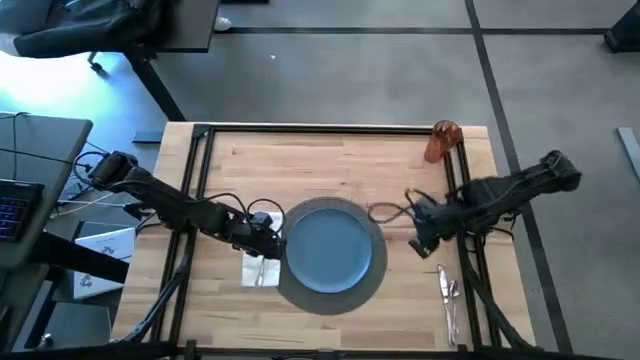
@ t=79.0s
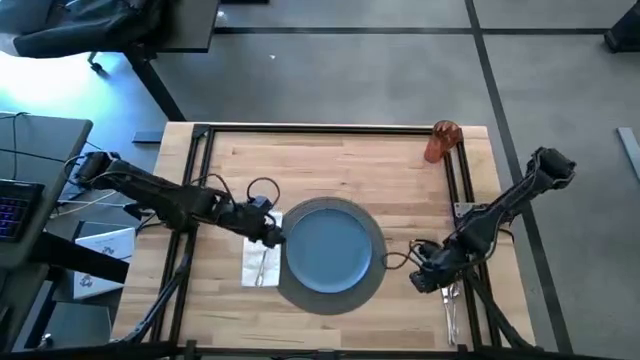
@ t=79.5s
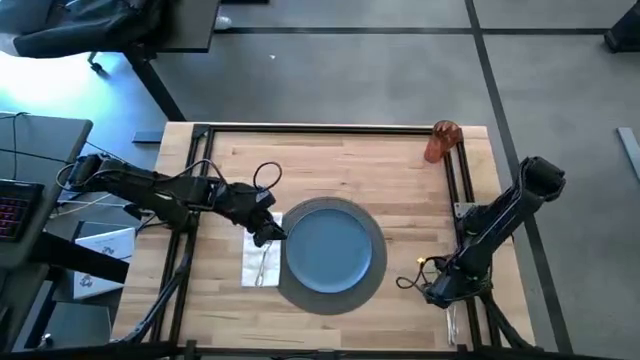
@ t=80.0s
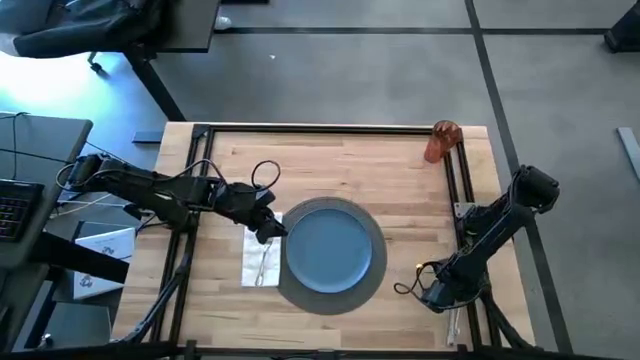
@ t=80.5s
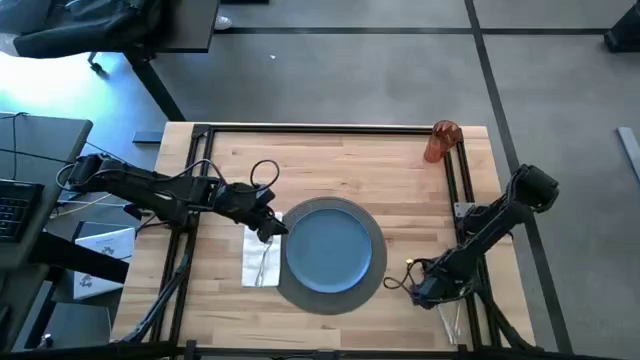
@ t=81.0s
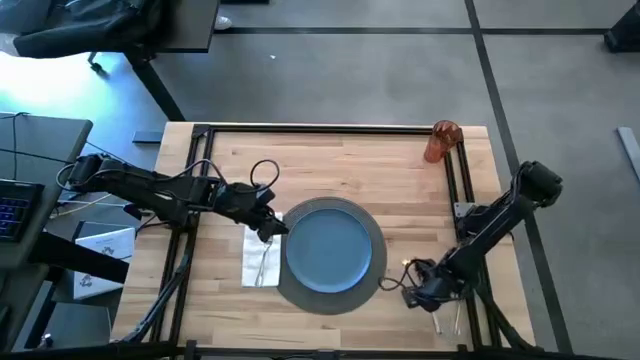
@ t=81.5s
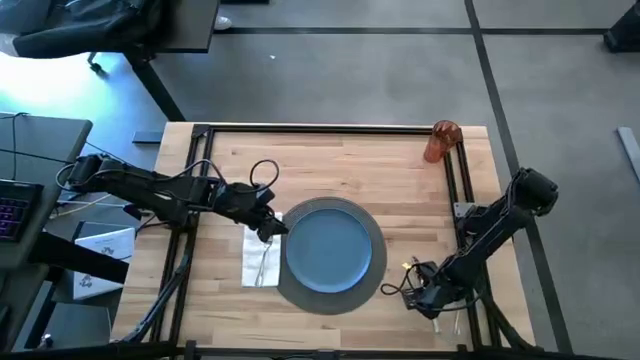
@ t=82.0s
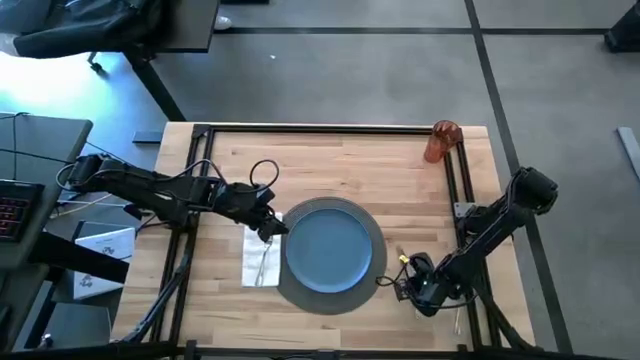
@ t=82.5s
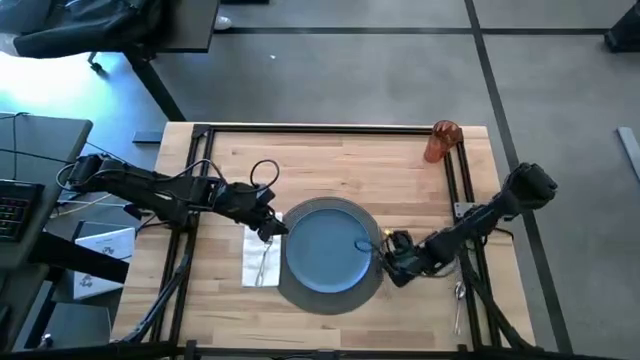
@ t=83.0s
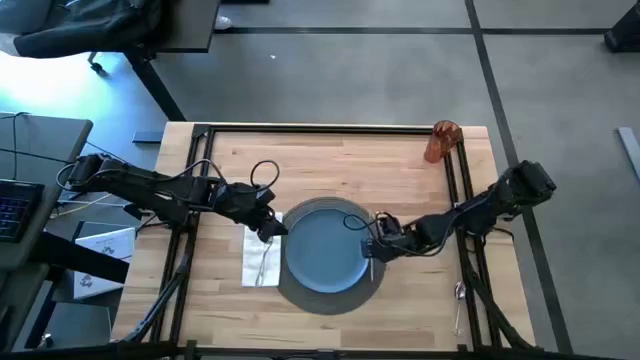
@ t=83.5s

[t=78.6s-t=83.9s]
Task: Set table place
Put the silver table knife on the table mat to the right side of the blue plate

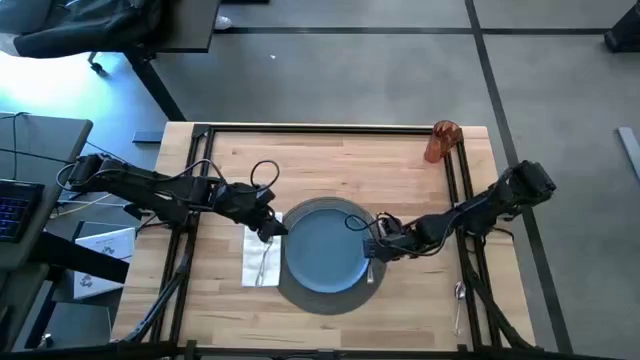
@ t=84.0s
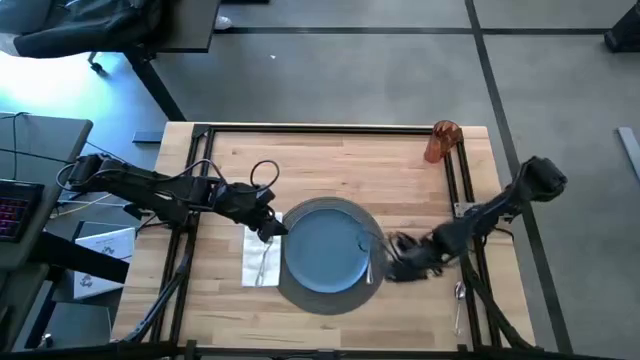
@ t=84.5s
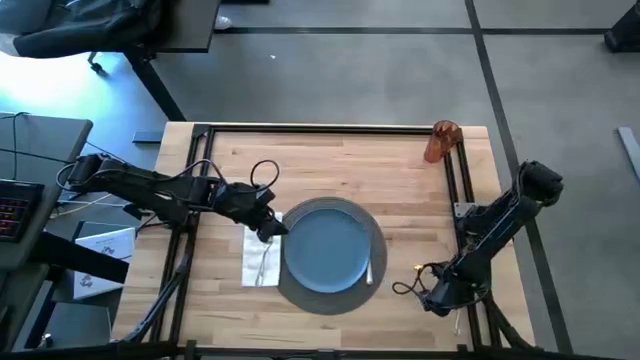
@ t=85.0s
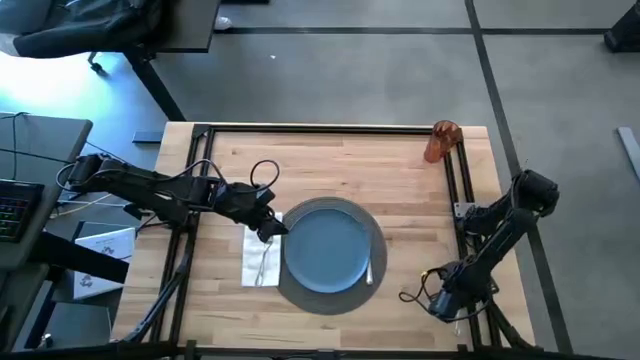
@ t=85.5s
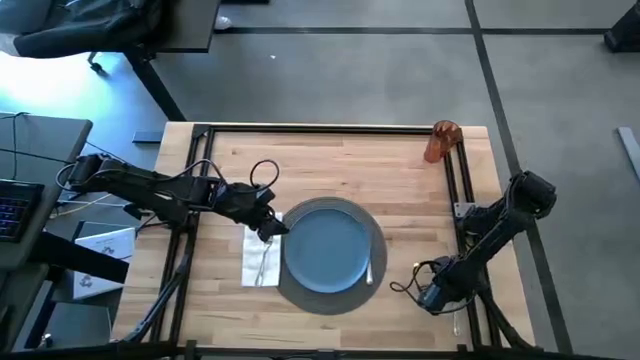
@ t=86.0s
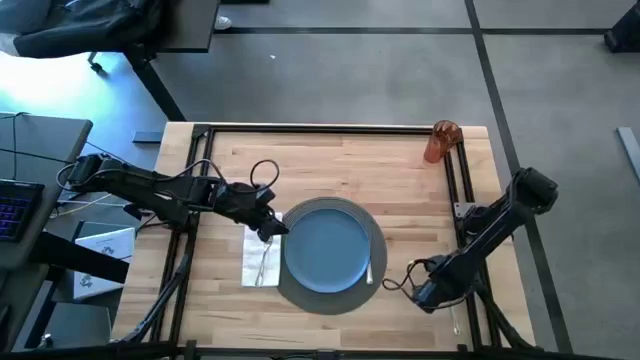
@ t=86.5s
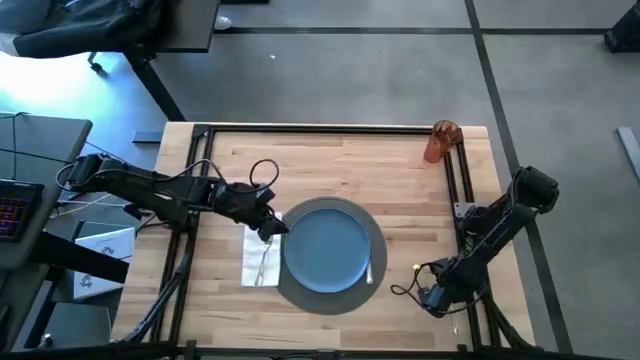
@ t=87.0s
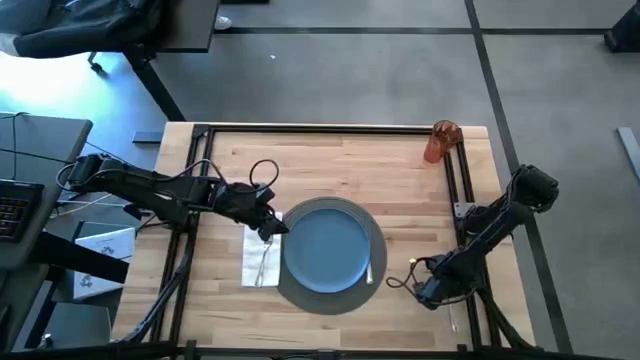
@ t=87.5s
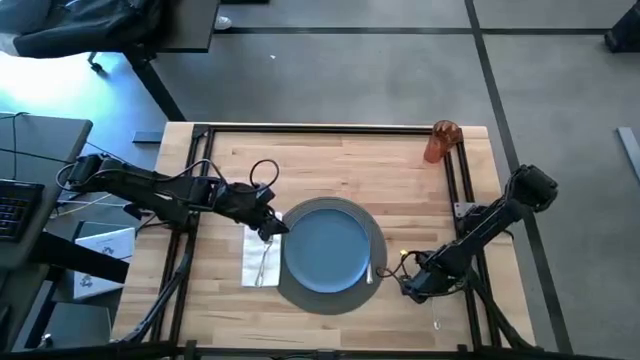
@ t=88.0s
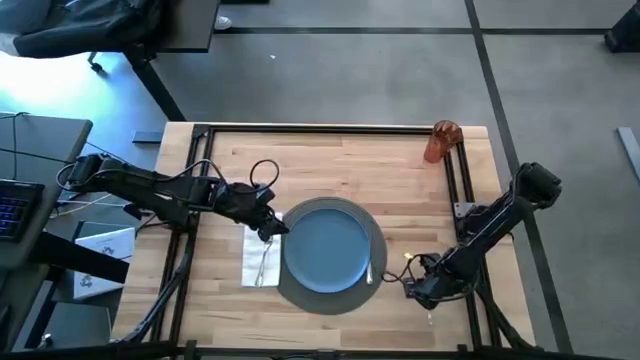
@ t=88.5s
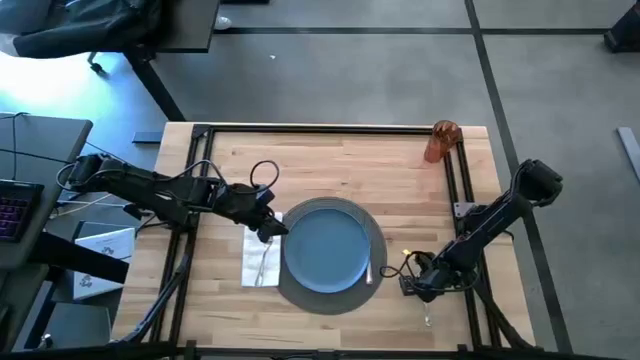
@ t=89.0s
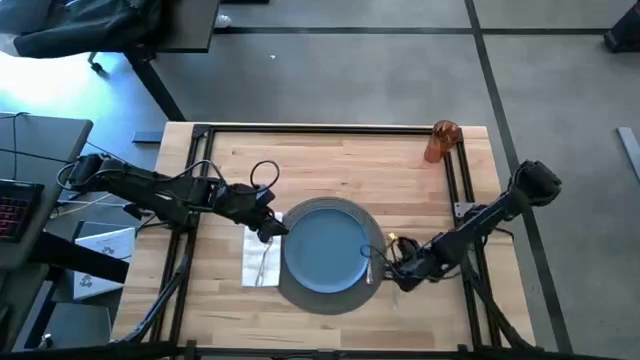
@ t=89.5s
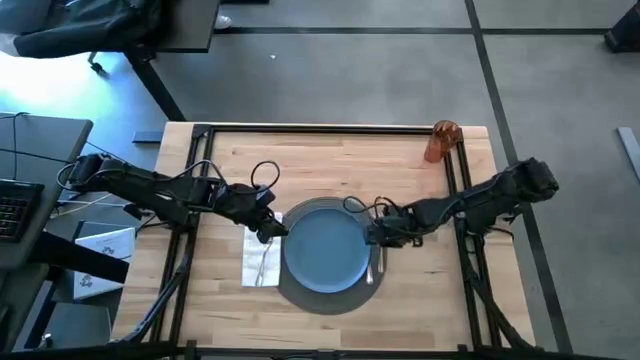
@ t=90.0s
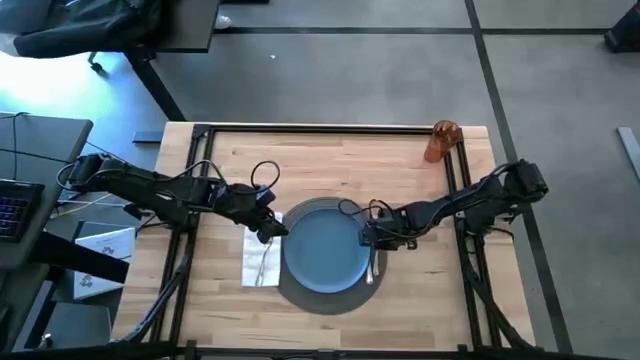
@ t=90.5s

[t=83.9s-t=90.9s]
Put the silver spoon on the table mat to the right side of the silver table knife

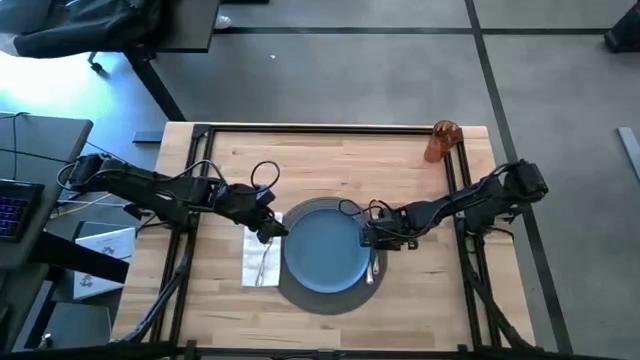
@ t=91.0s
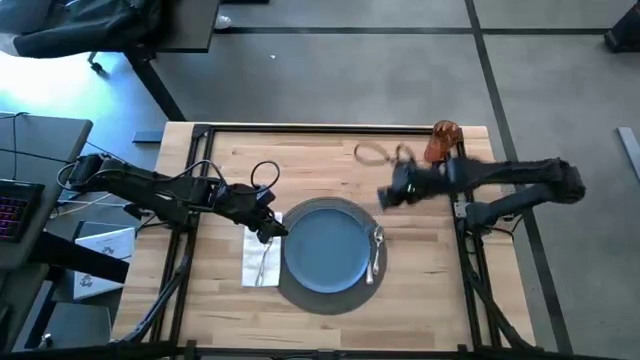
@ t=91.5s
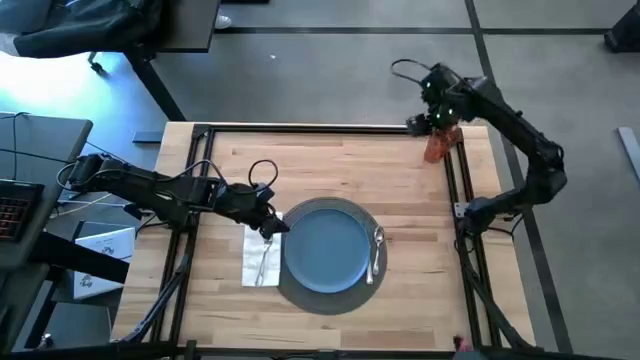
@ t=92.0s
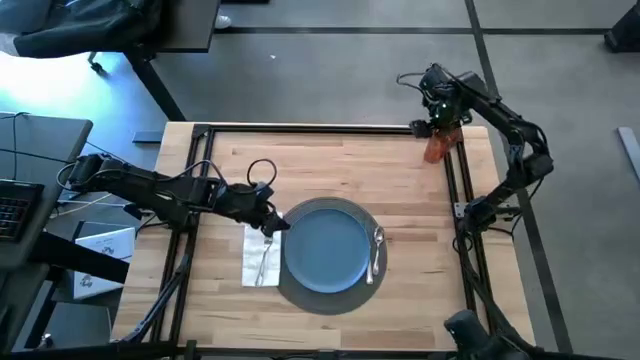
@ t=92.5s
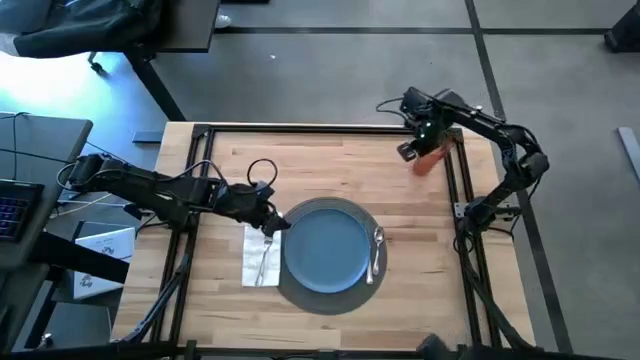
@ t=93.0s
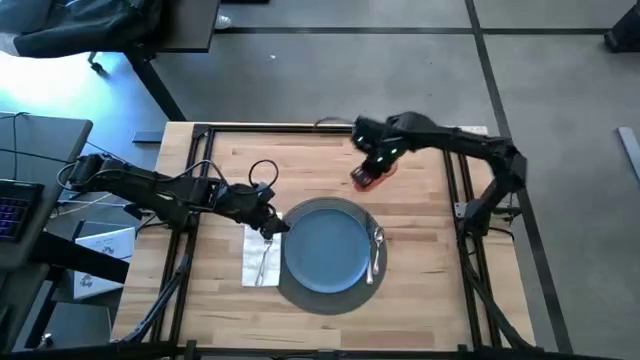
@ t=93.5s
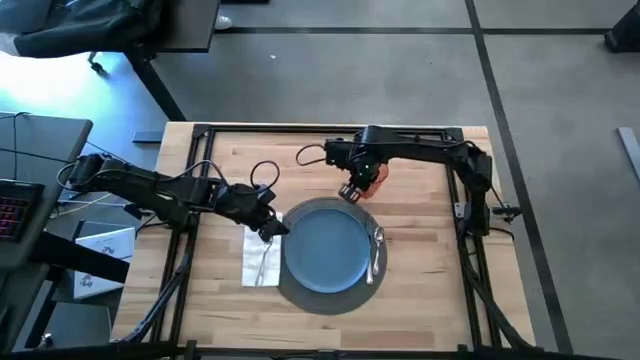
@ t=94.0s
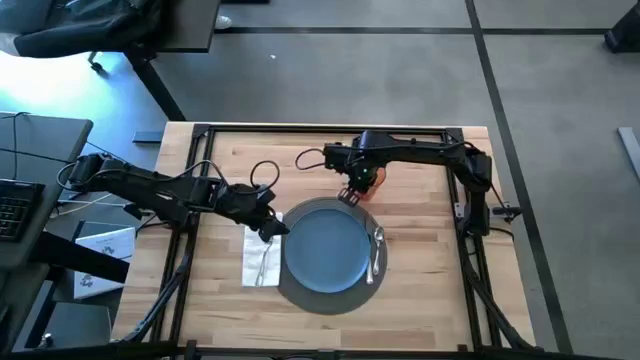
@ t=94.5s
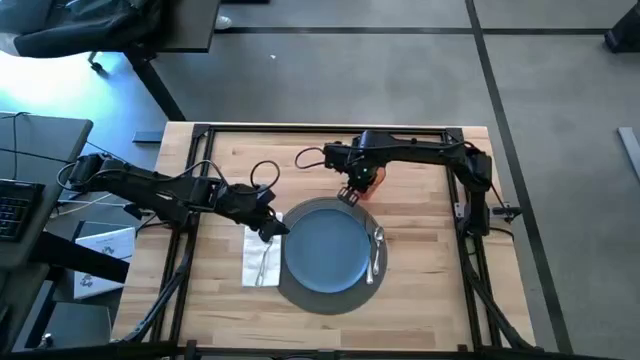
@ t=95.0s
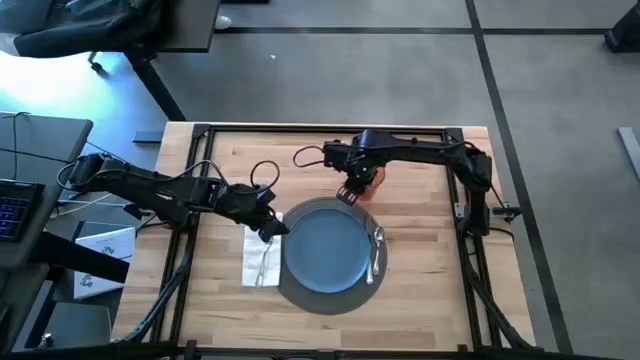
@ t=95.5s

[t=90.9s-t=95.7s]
Move the orange cup to the top right of the gray table mat

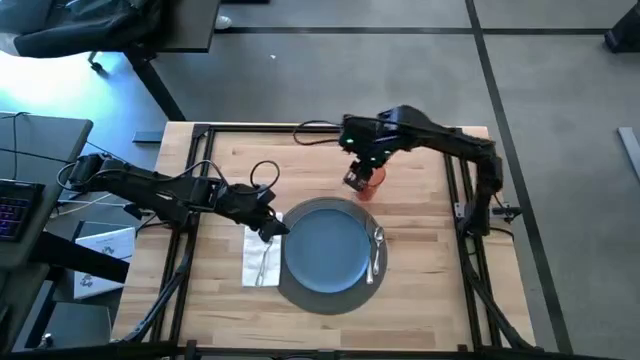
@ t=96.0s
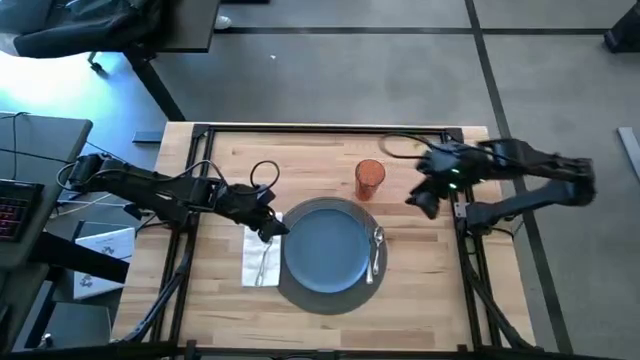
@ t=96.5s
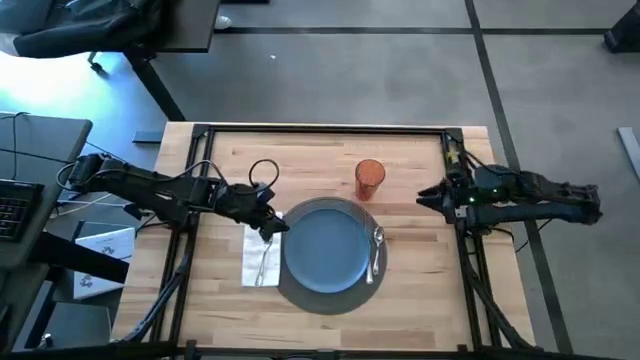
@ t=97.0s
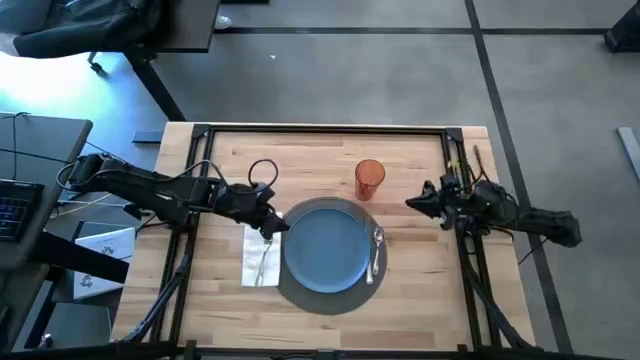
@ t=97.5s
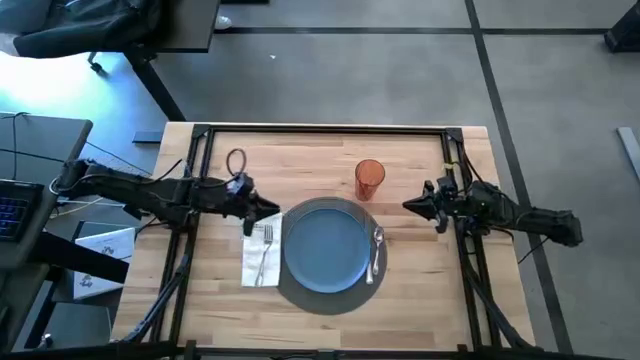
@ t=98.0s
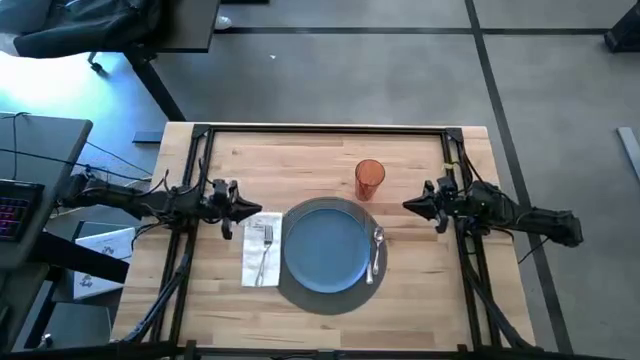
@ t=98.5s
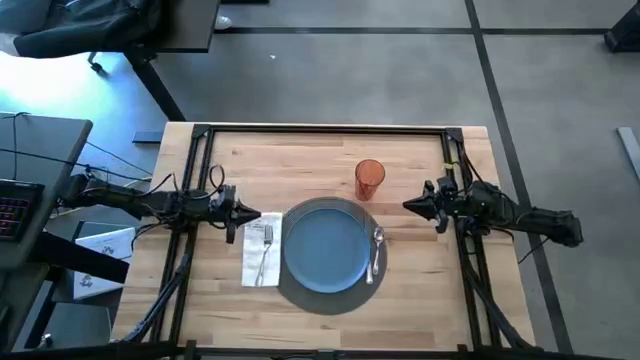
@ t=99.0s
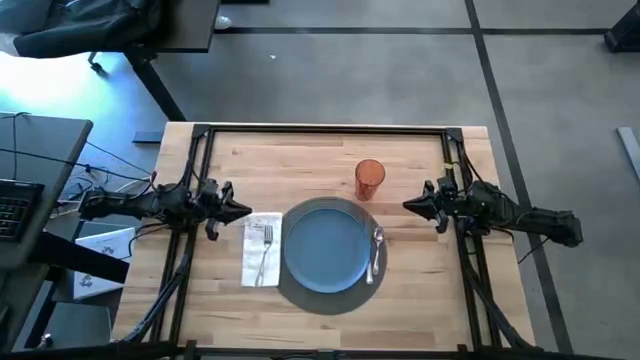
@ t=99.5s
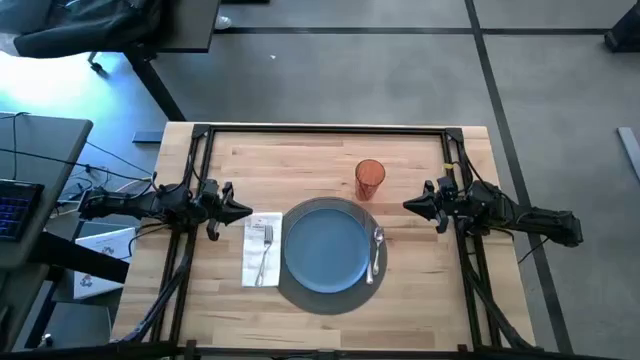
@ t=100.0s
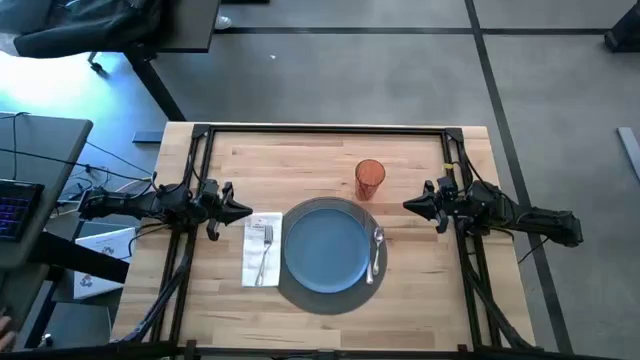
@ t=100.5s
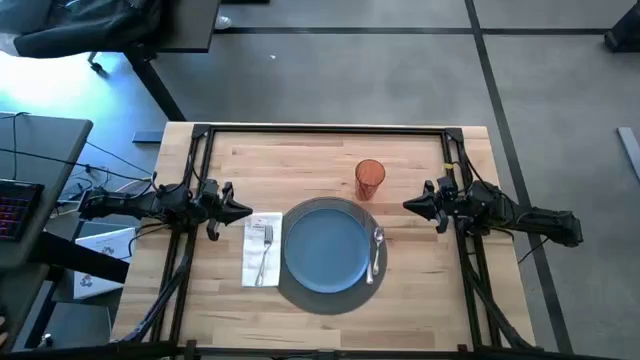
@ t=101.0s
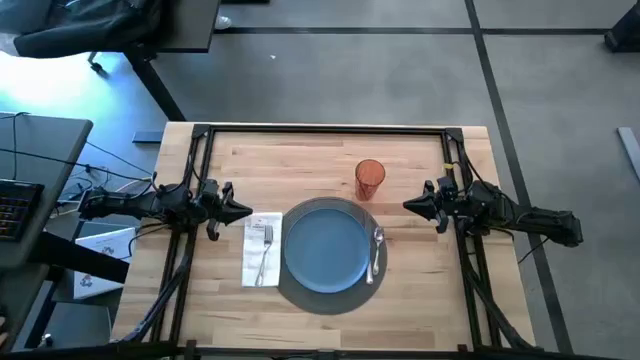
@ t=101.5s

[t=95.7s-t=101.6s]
Return to Home position
